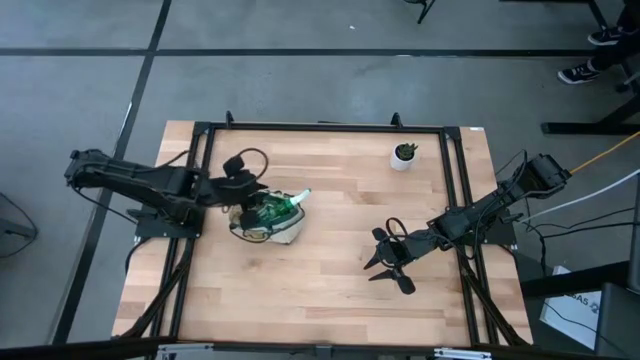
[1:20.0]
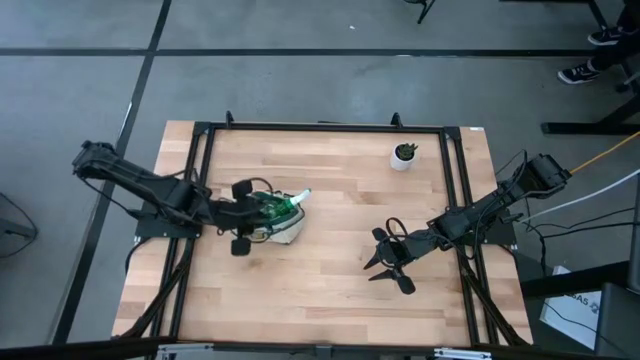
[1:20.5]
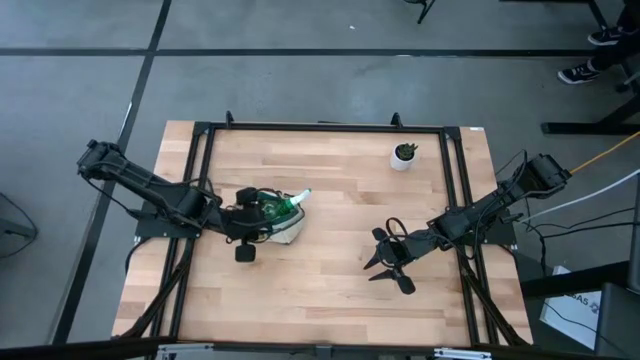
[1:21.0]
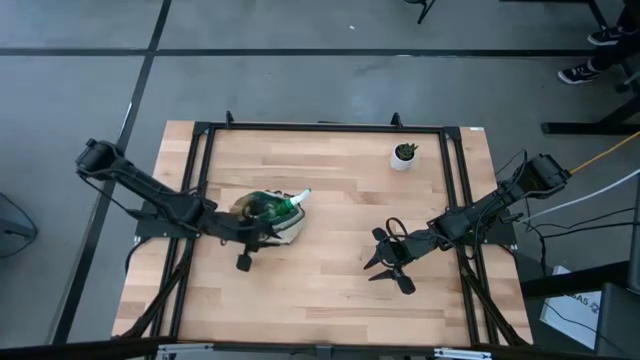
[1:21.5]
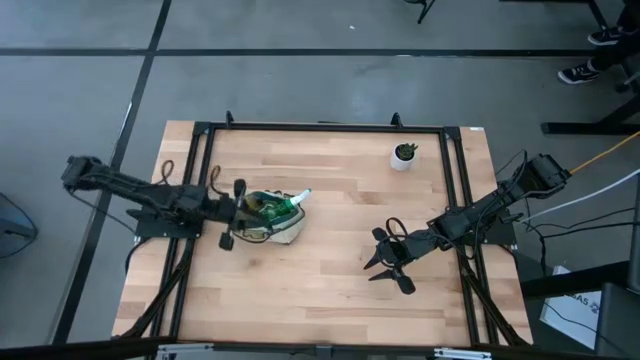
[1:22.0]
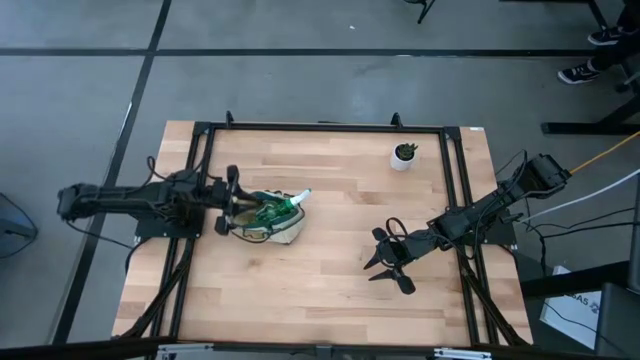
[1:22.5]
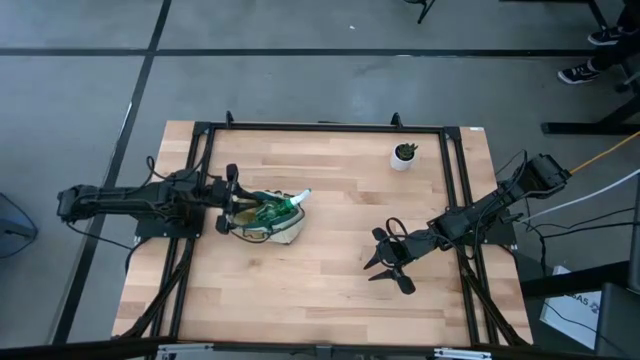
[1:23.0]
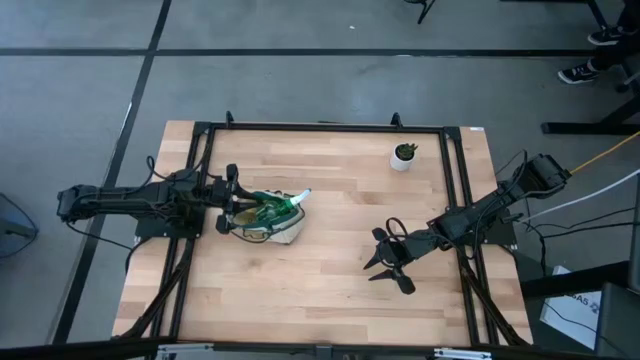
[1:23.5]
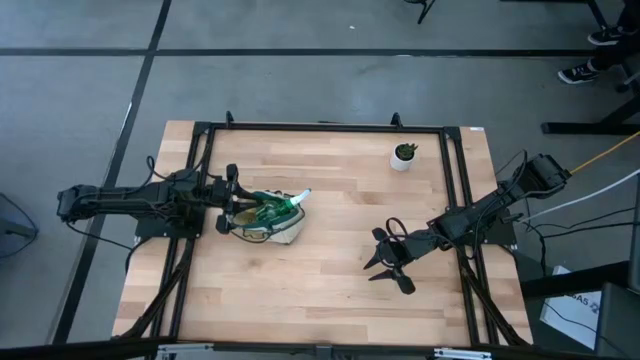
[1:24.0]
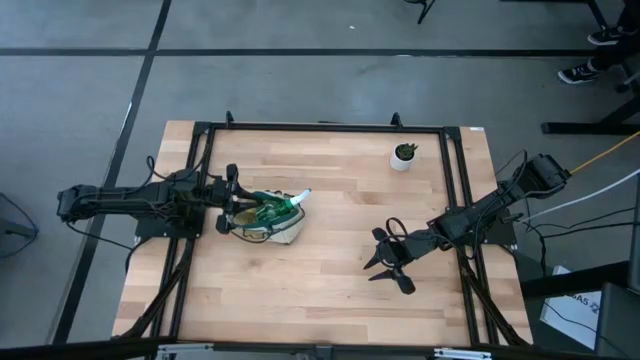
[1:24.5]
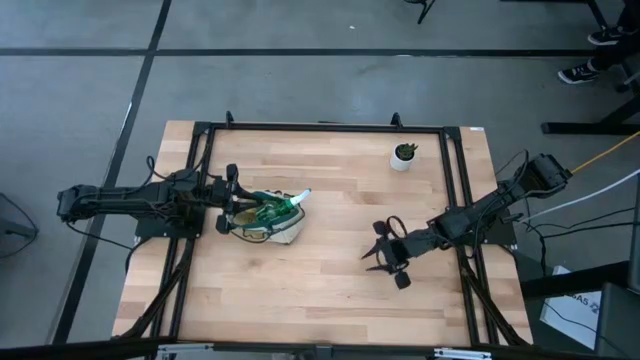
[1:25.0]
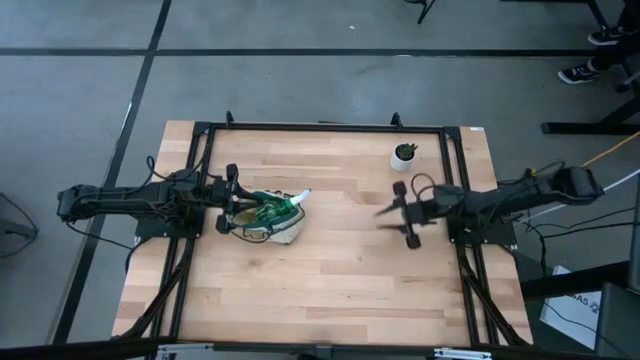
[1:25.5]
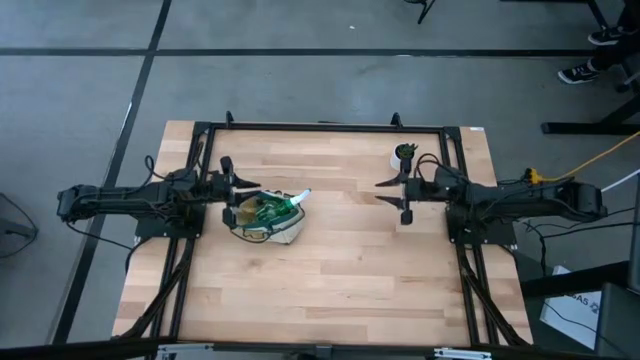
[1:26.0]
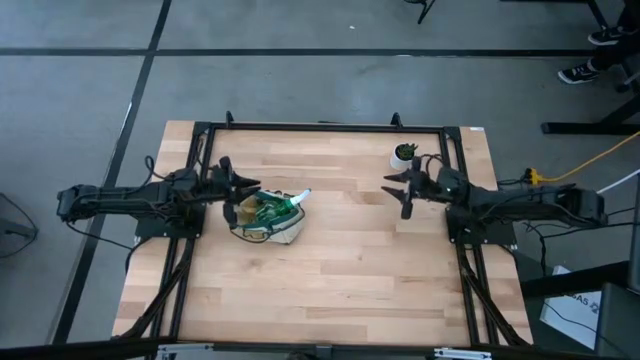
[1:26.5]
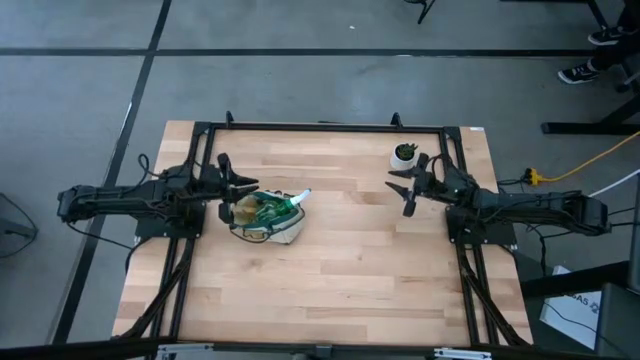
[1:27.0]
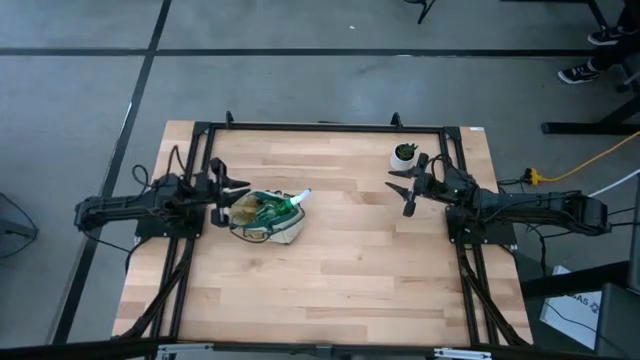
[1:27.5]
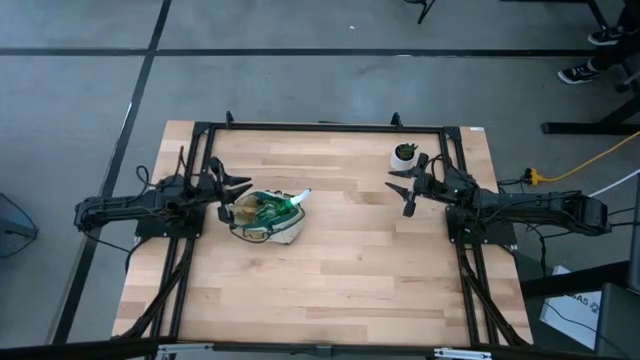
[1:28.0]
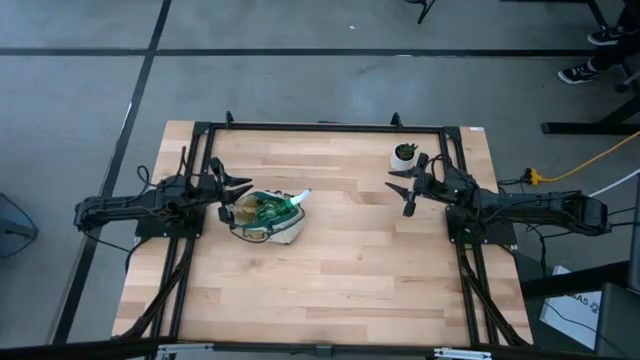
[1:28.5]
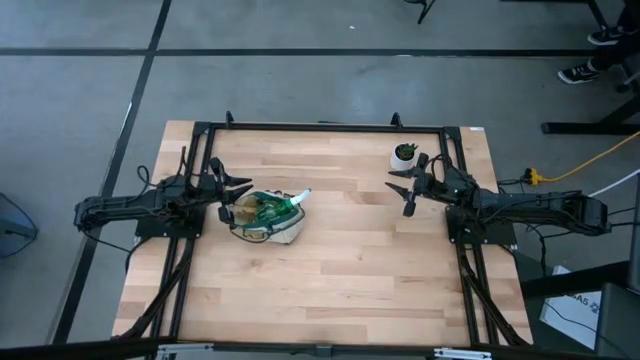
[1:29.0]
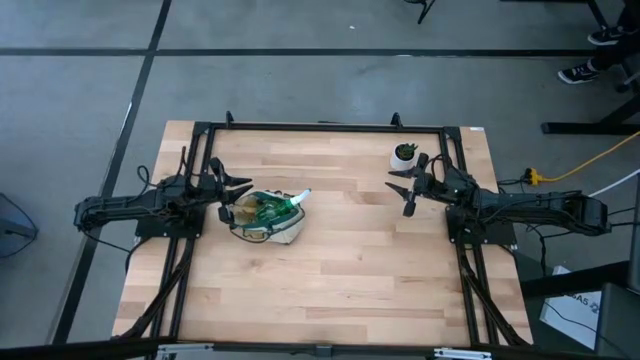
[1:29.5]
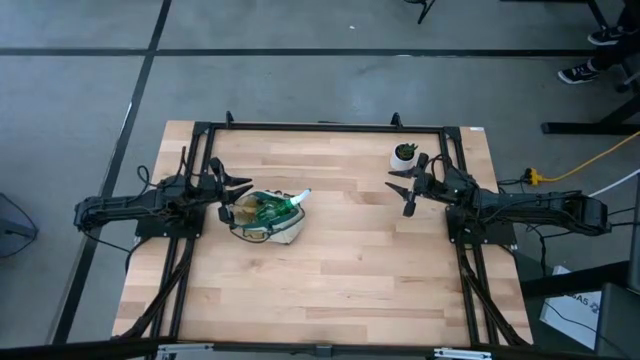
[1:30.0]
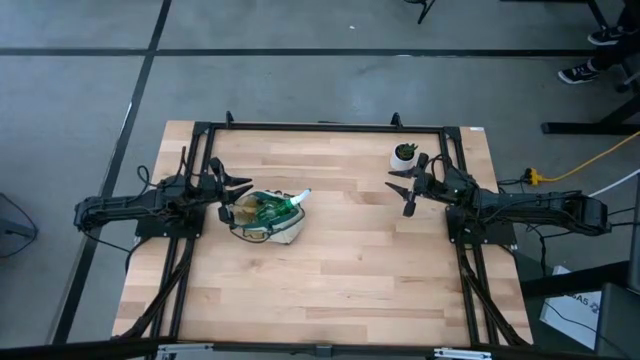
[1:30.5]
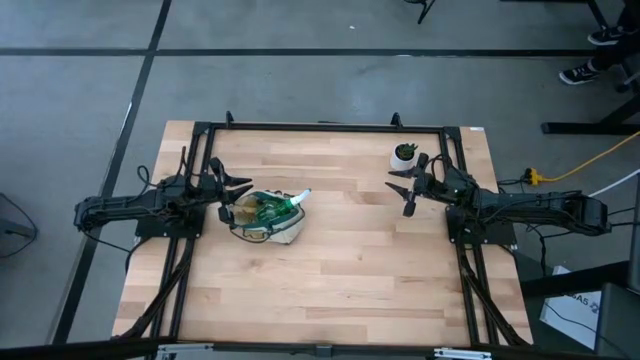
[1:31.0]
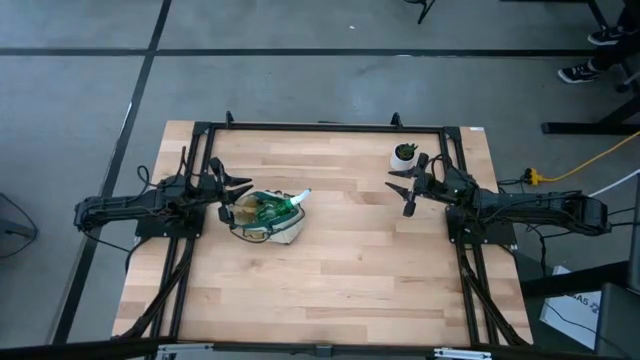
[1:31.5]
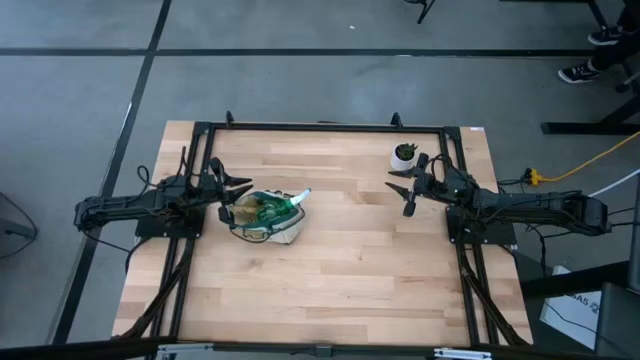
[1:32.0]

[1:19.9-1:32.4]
Task: Pick & Place Garden tools in Gardening bag
Return to Home Position

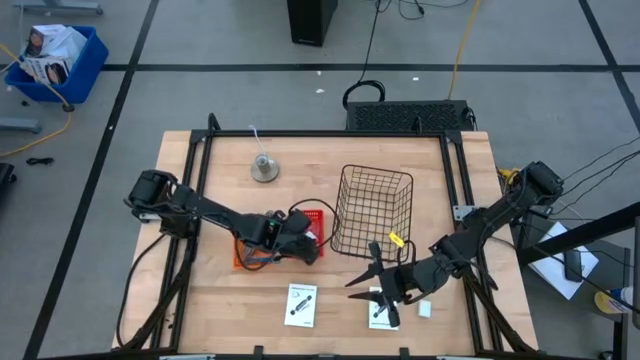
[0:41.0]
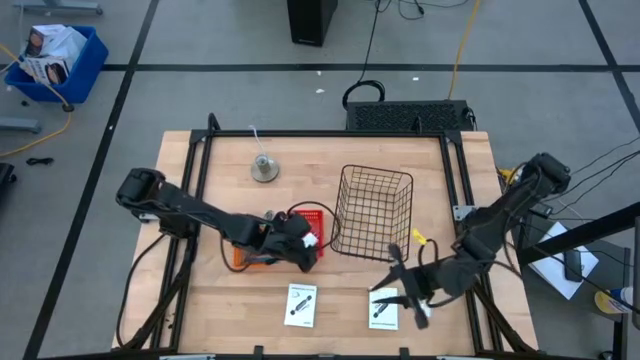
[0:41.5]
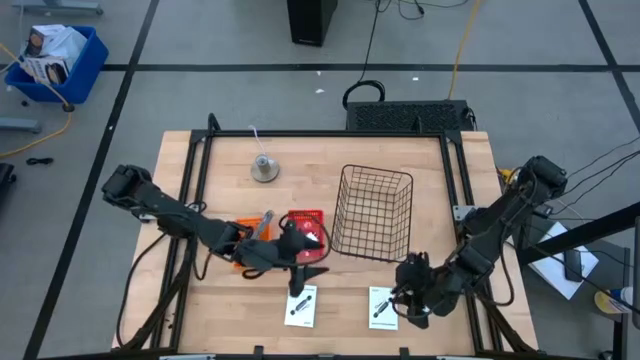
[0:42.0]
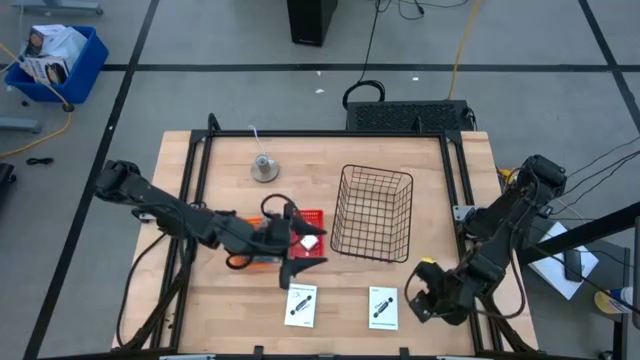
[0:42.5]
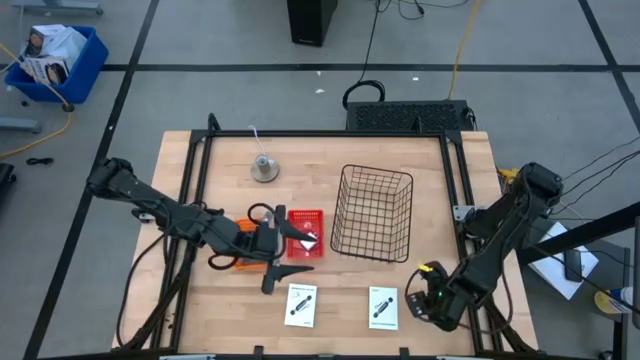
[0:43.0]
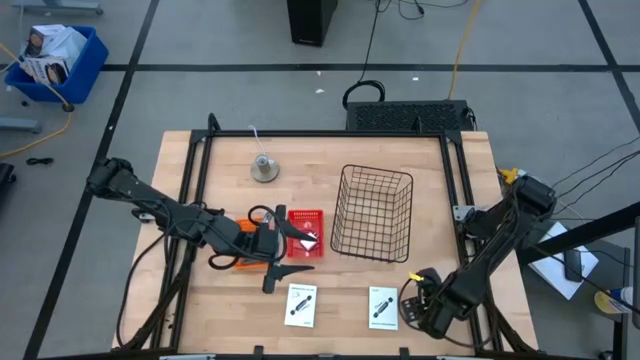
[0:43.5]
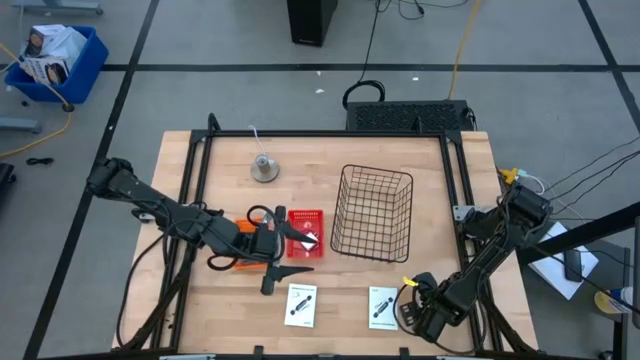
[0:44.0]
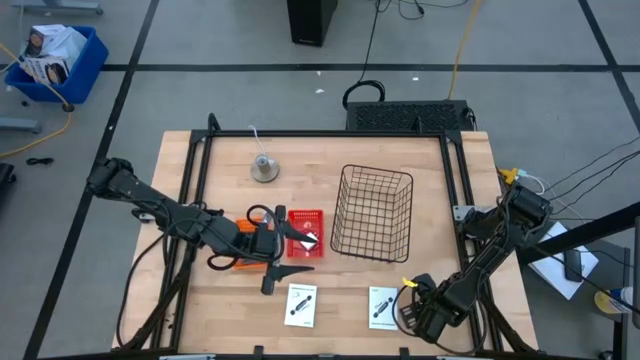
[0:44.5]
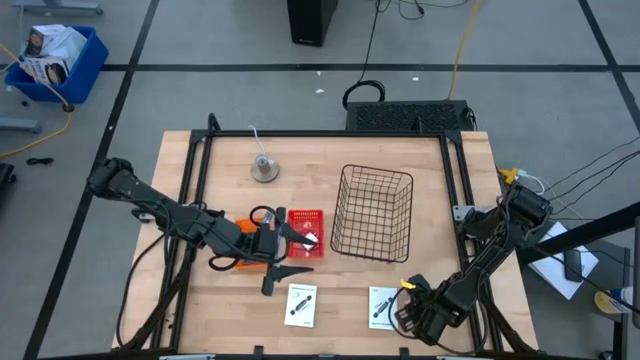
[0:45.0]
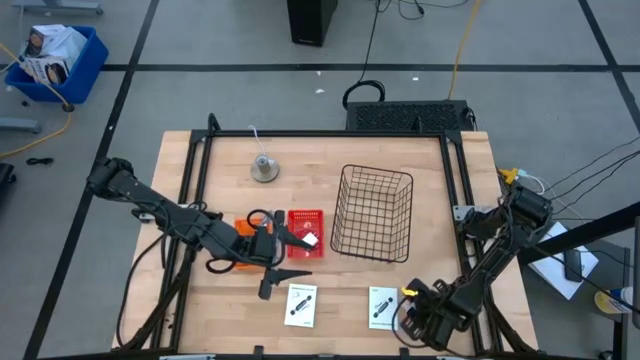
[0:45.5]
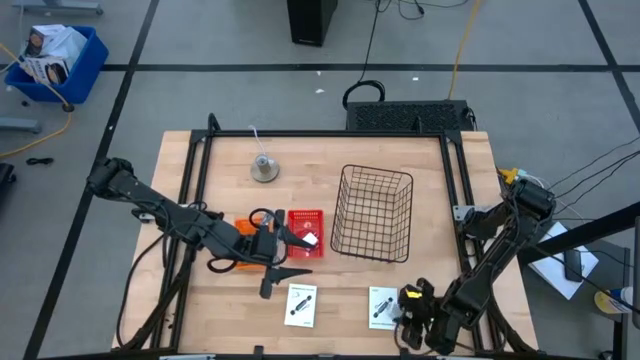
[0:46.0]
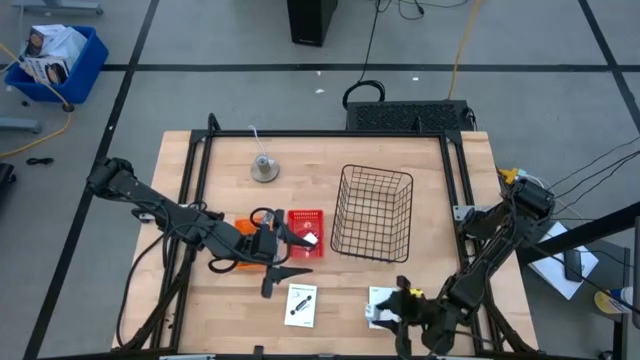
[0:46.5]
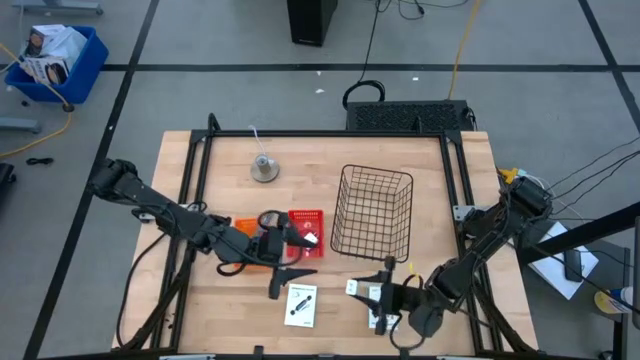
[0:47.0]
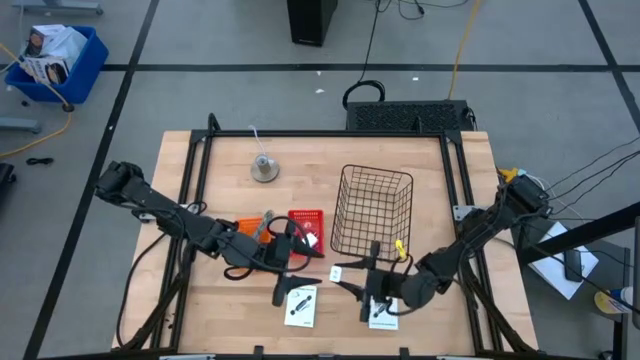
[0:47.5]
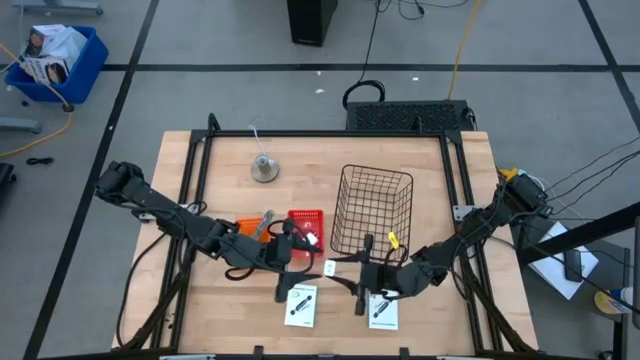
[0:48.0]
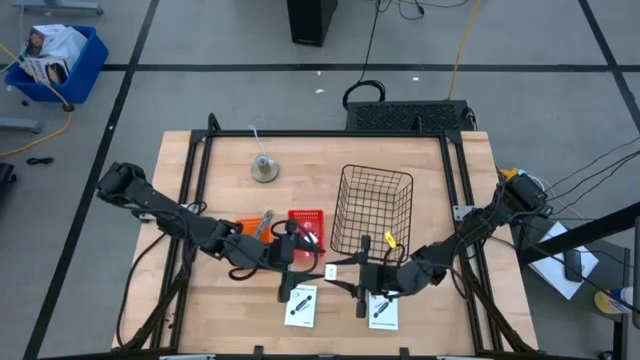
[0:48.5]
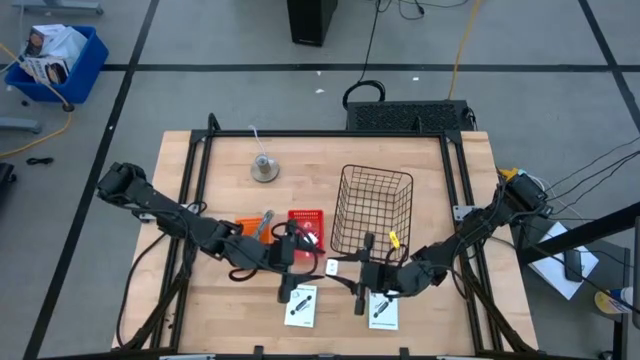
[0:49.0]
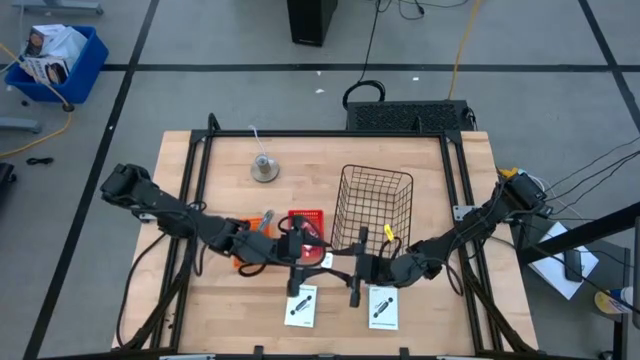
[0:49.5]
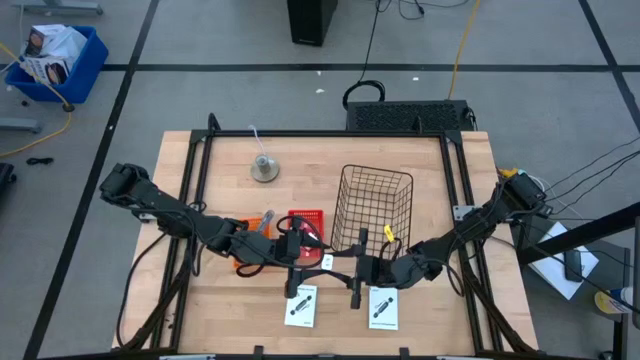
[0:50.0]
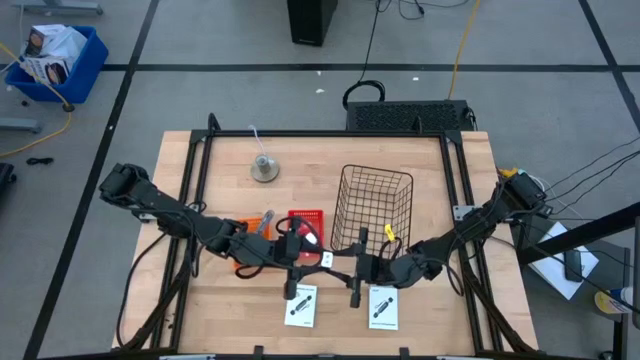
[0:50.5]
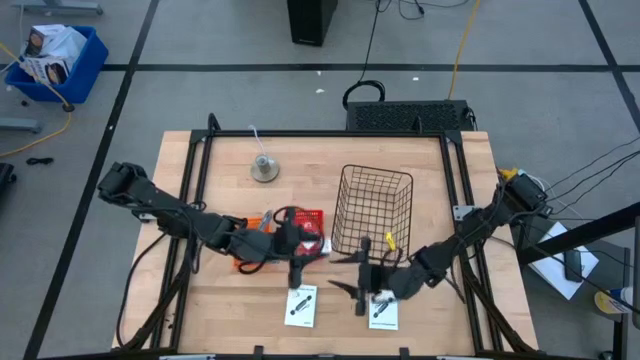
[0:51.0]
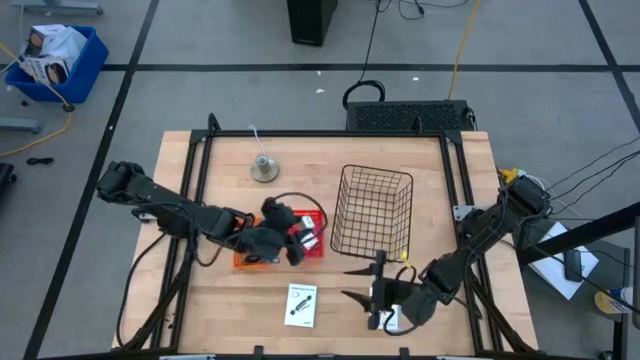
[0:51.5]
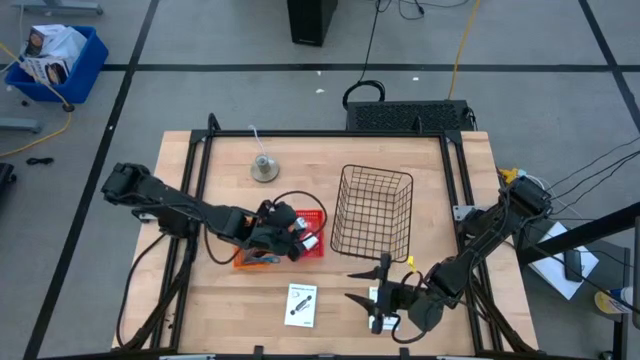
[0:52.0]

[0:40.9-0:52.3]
Task: Pick and place items into bin
Put the charger adapter into the red bin
